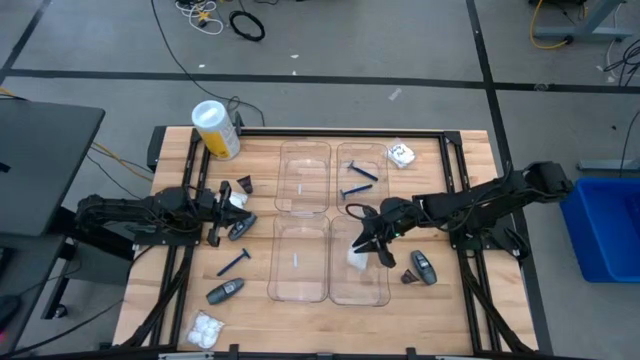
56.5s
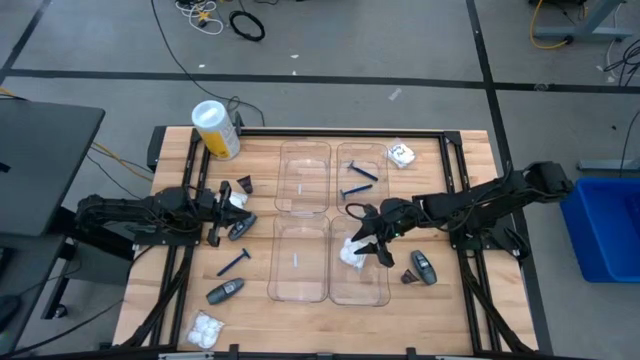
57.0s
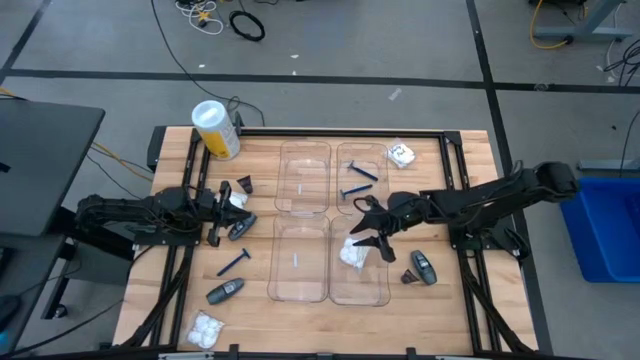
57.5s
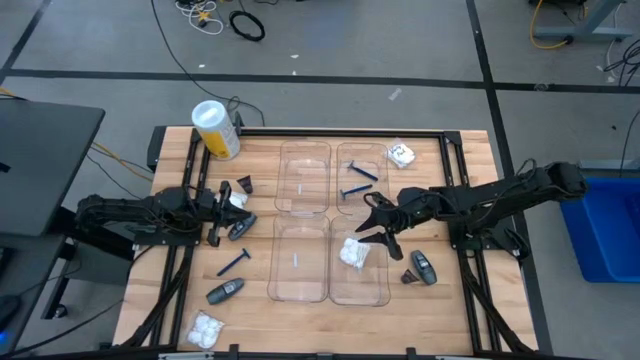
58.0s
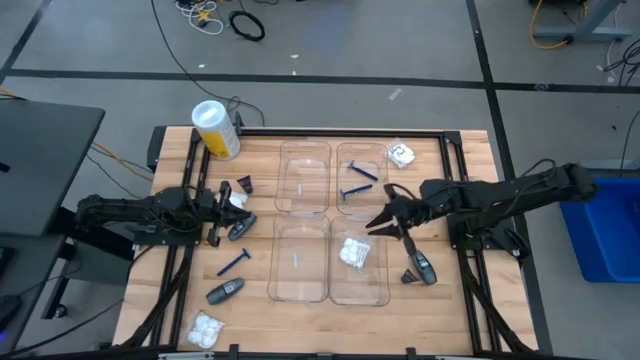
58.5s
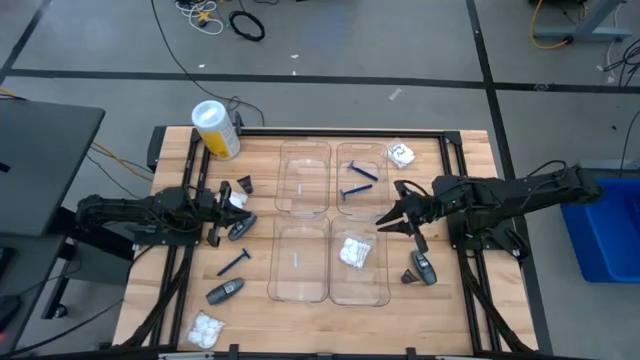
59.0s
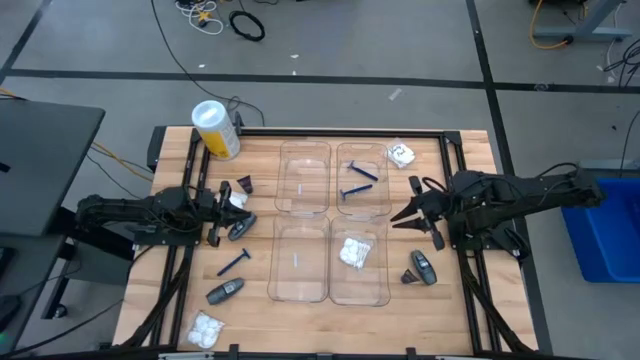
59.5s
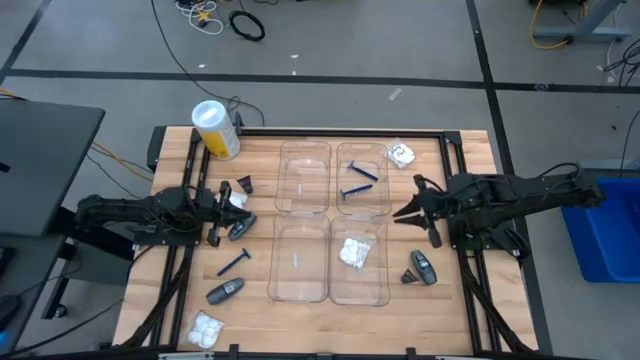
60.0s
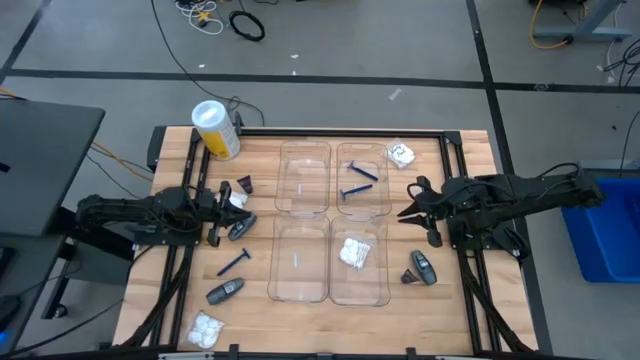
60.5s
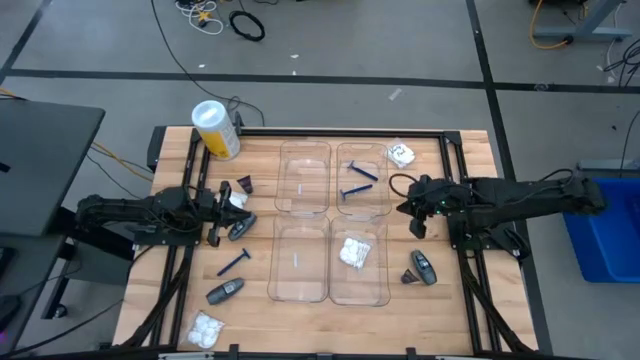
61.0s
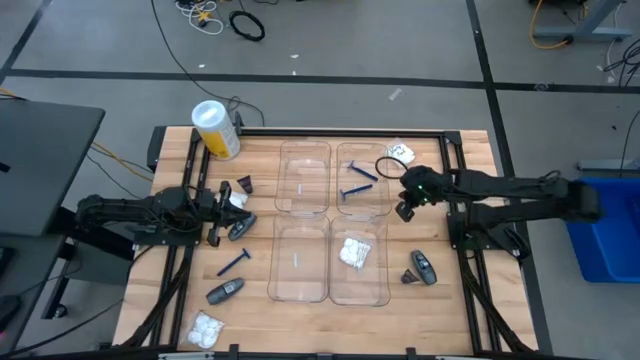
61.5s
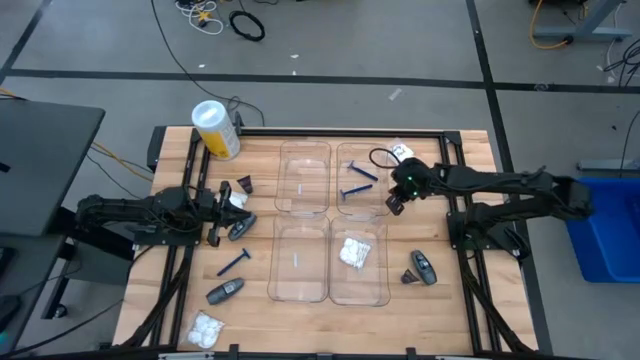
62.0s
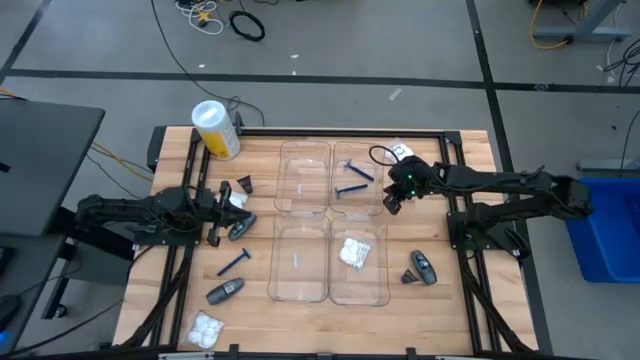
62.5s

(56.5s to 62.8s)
Task: Pick & Place Travel size toiletries
Adjust the transparent bin

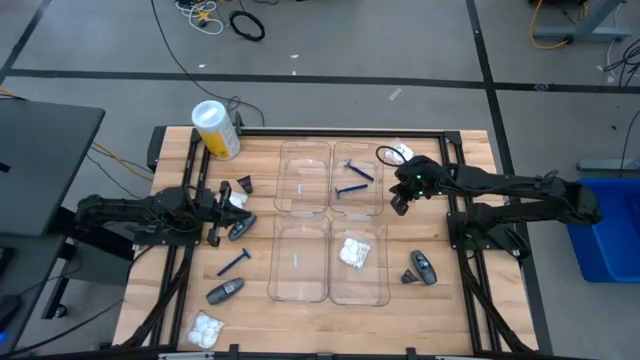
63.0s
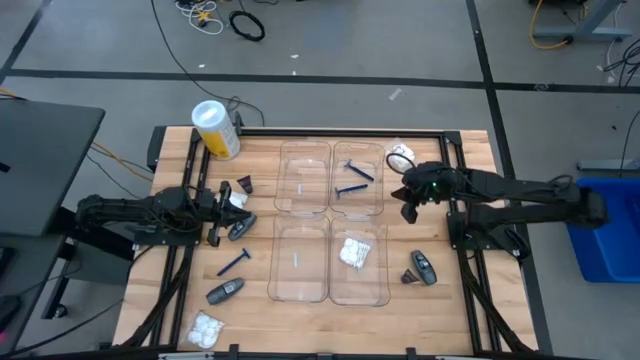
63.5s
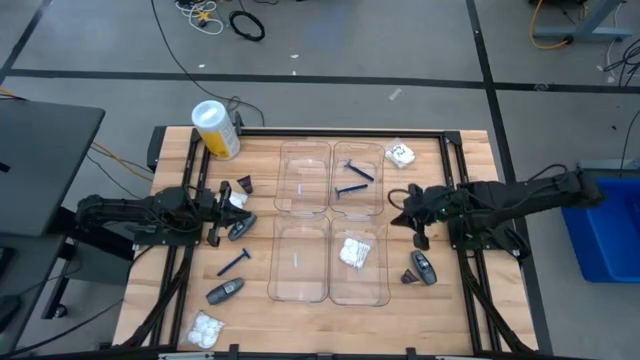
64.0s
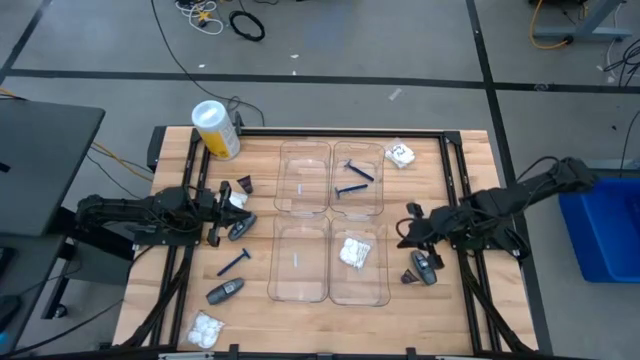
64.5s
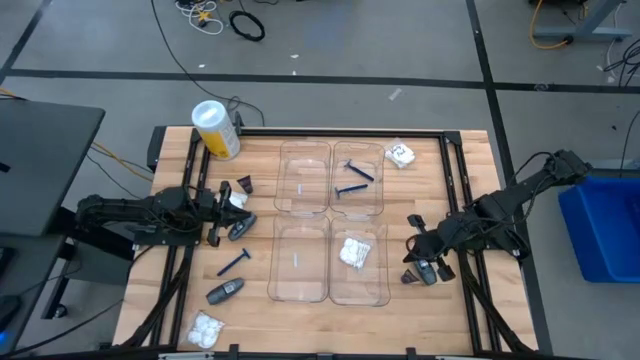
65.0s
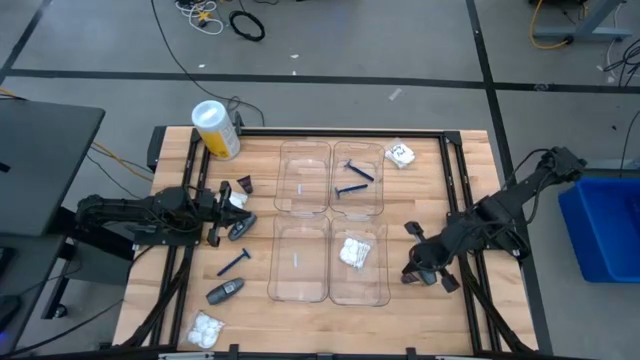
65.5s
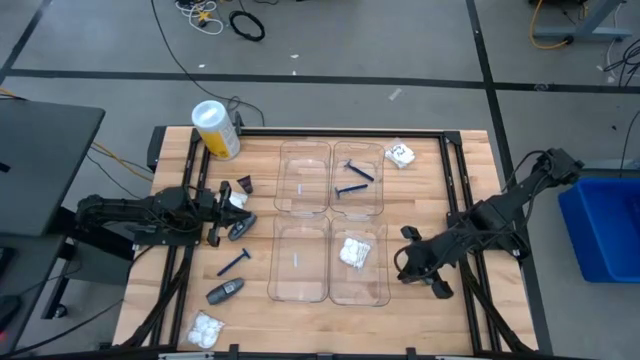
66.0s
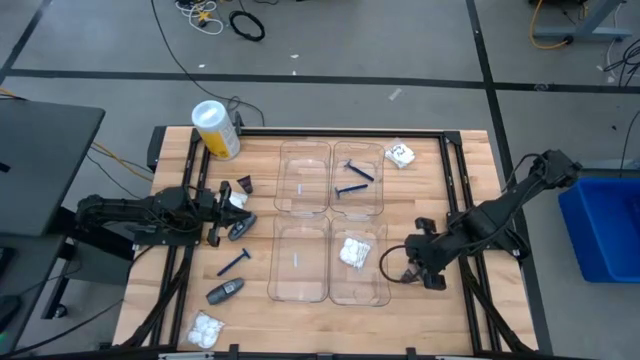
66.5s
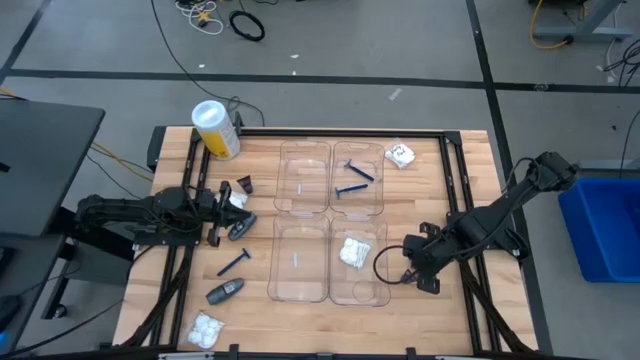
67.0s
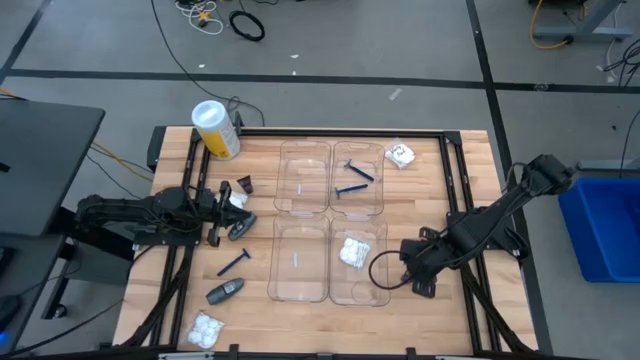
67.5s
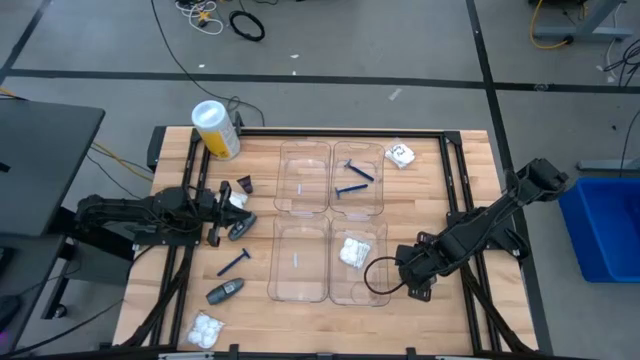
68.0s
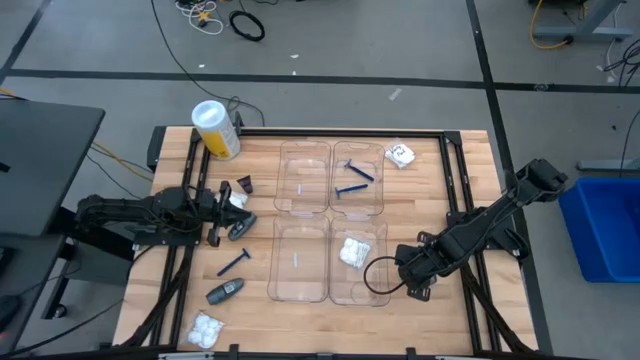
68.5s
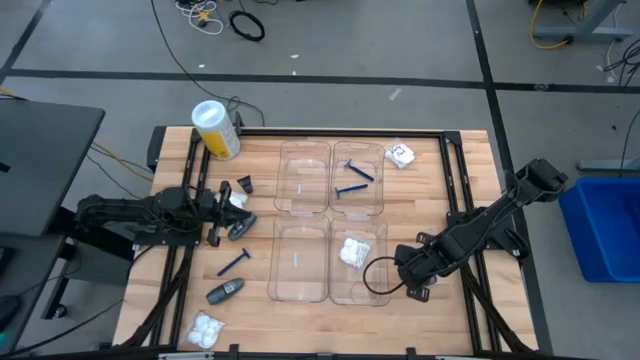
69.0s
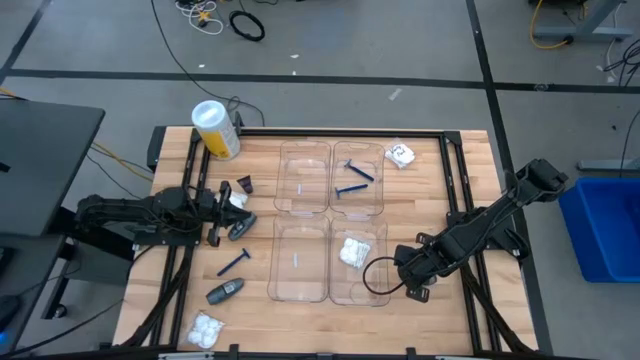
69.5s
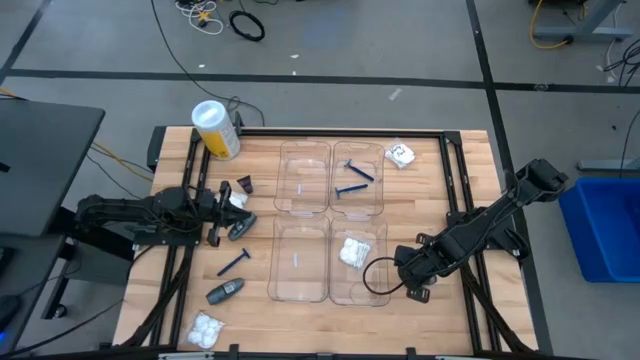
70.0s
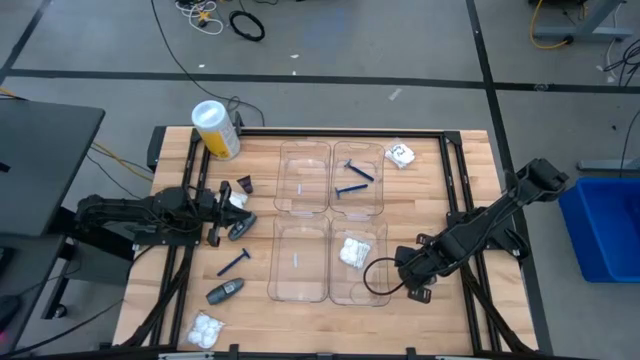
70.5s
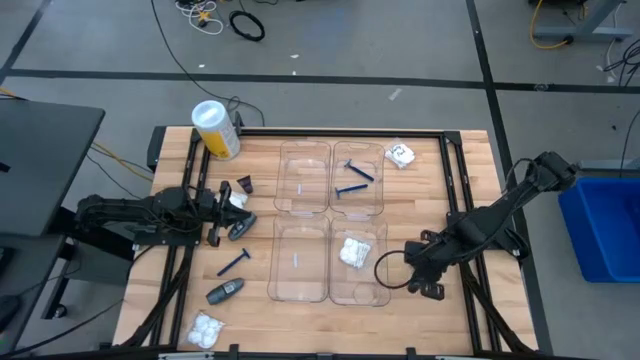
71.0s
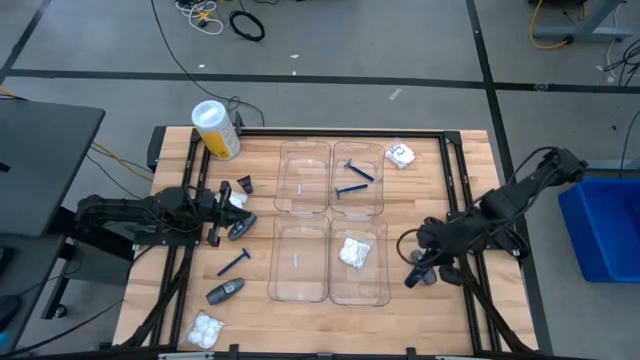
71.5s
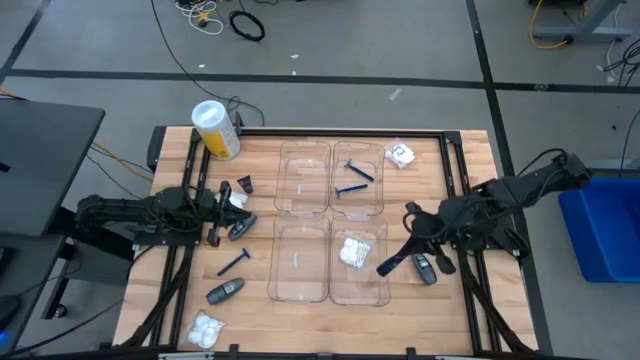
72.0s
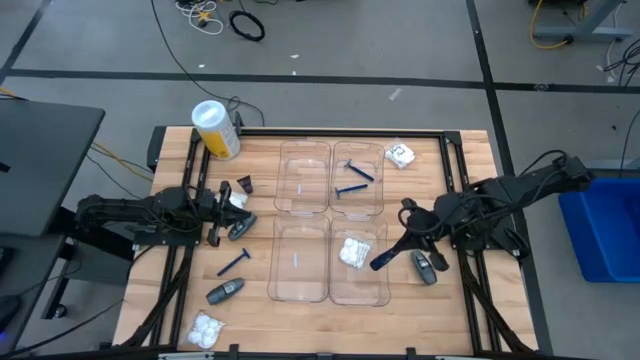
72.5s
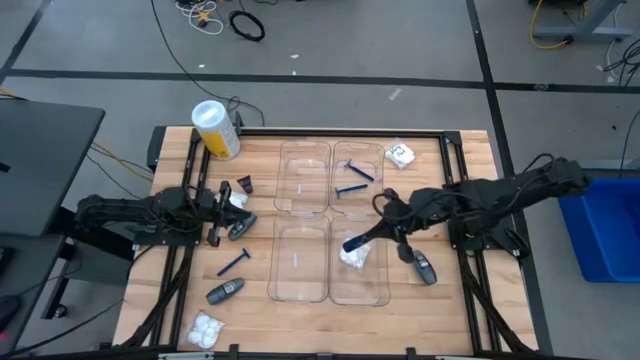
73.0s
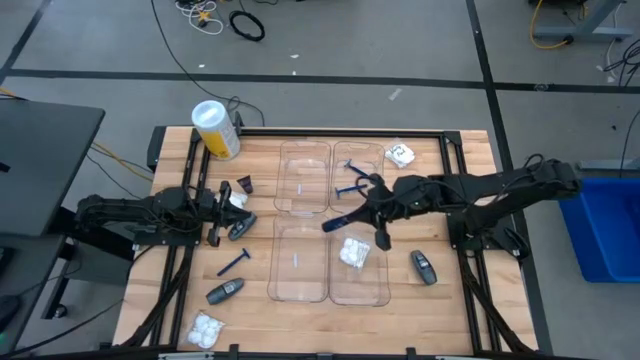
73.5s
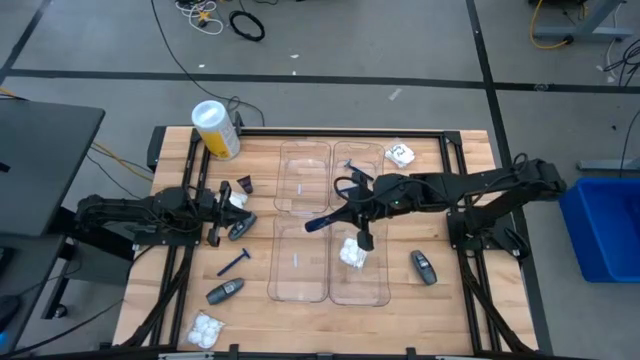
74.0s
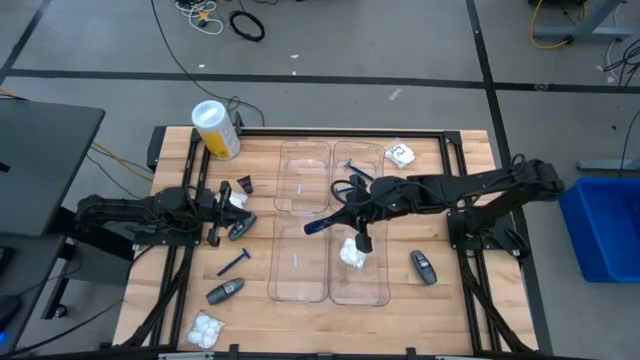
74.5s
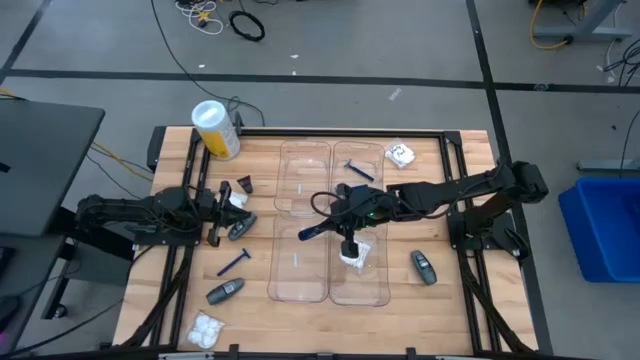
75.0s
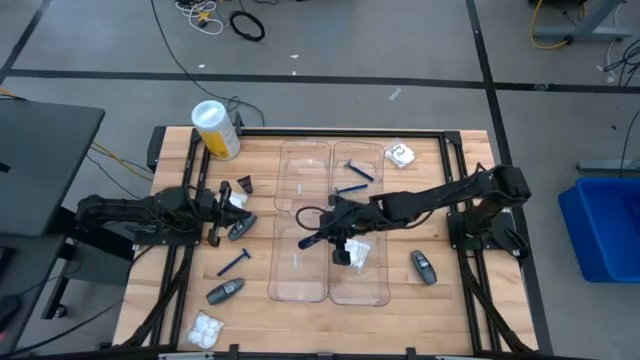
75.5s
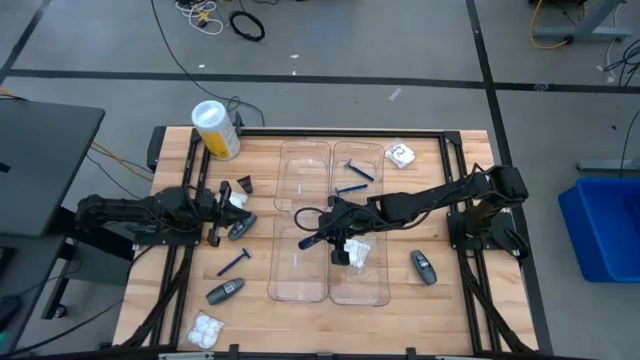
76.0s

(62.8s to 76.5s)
Put the right shave cream into the bottom left transparent bin
